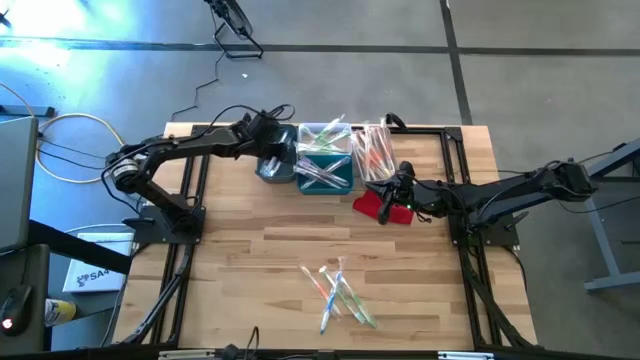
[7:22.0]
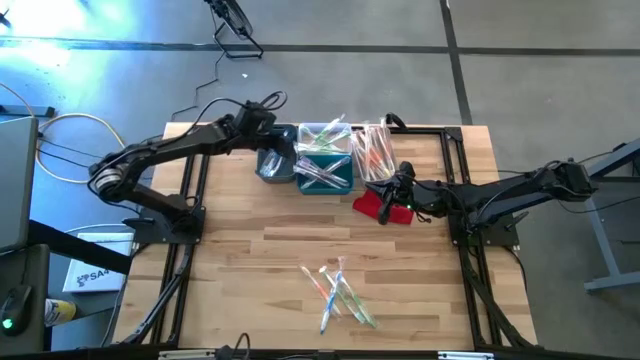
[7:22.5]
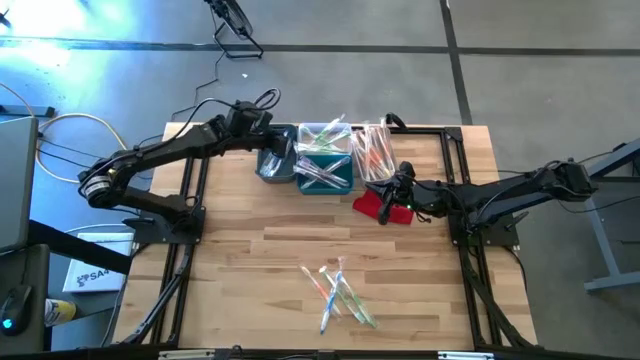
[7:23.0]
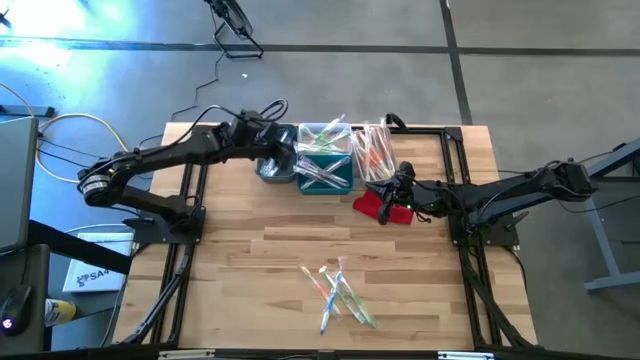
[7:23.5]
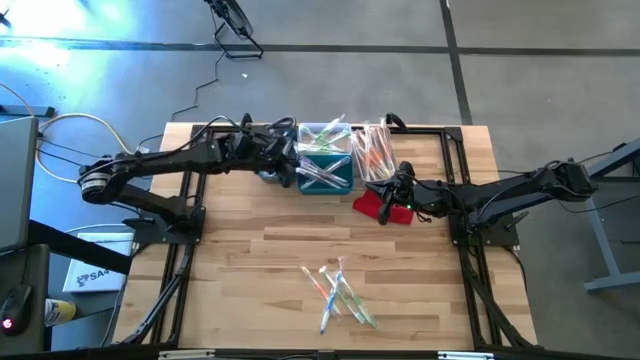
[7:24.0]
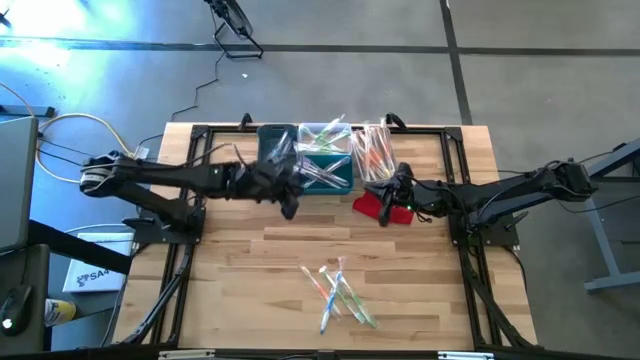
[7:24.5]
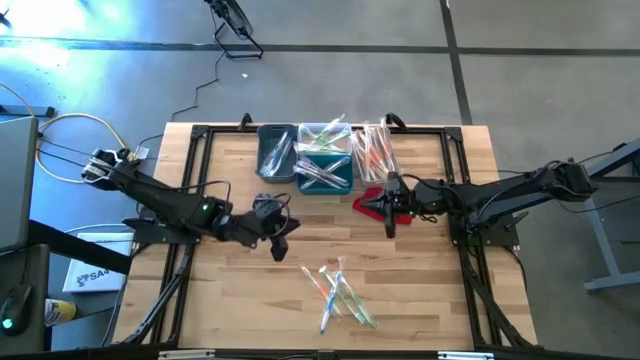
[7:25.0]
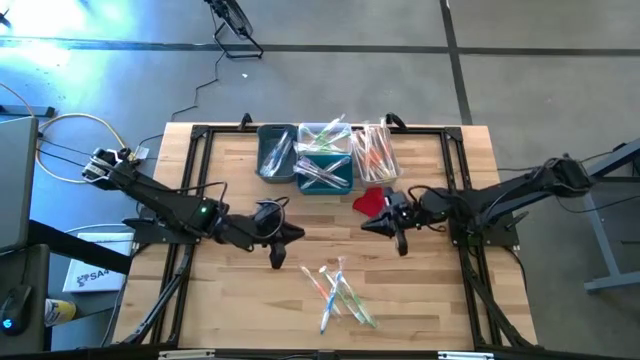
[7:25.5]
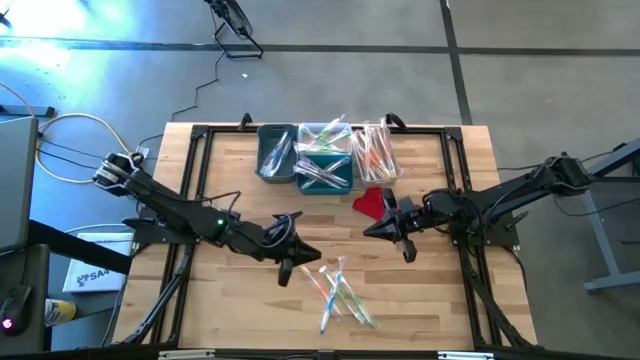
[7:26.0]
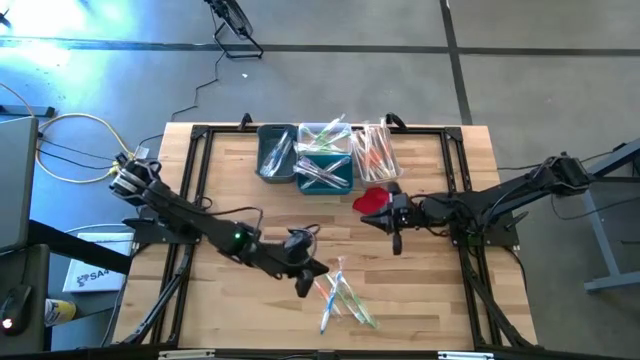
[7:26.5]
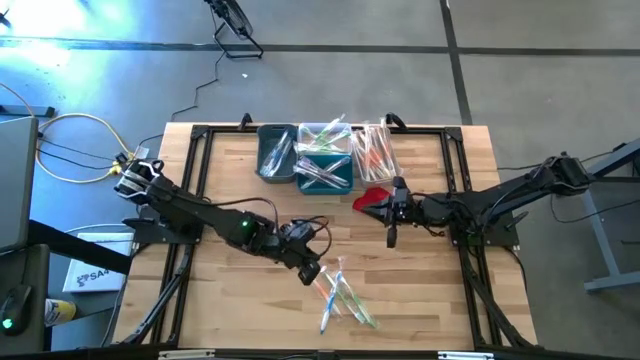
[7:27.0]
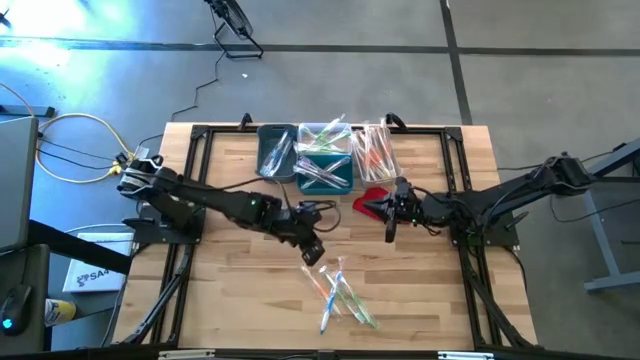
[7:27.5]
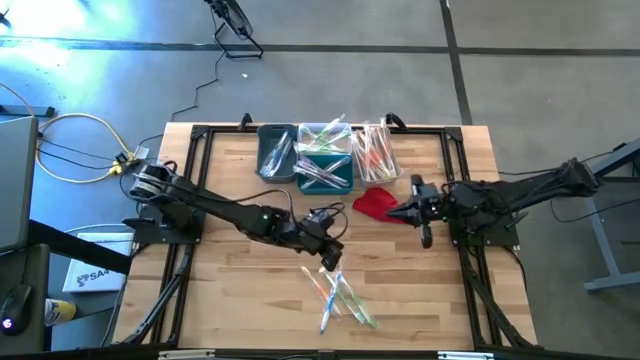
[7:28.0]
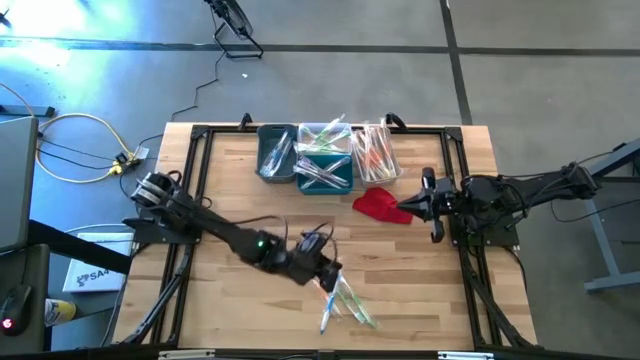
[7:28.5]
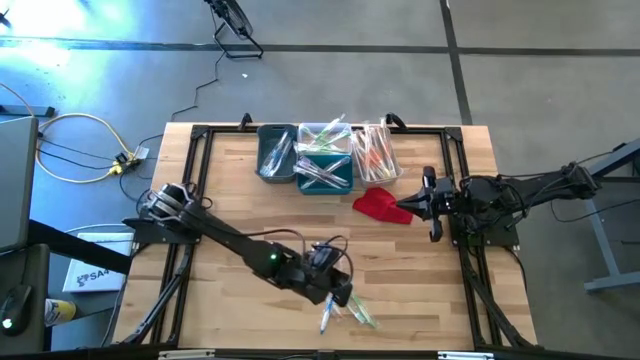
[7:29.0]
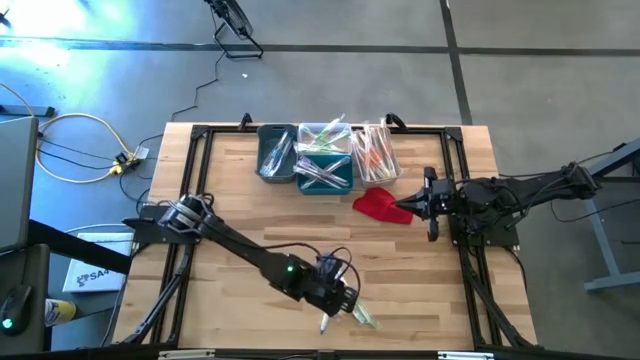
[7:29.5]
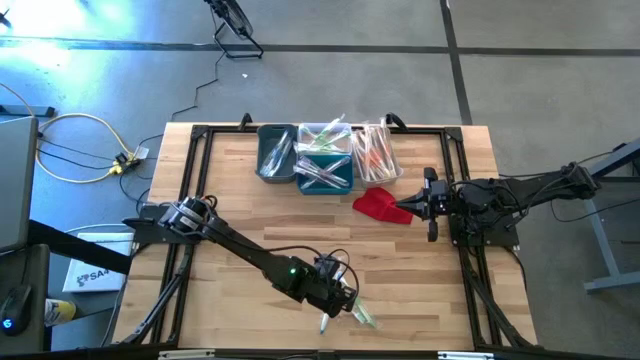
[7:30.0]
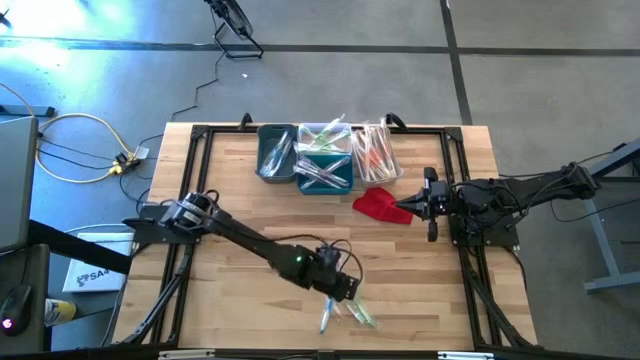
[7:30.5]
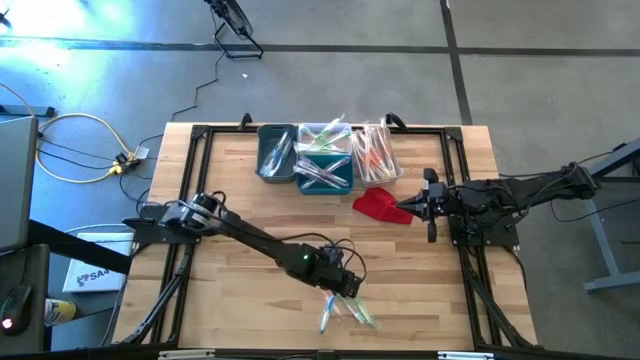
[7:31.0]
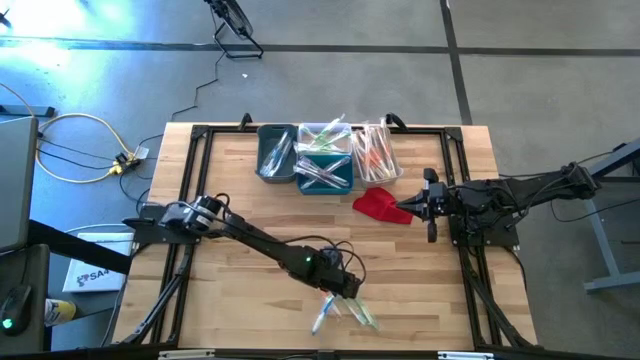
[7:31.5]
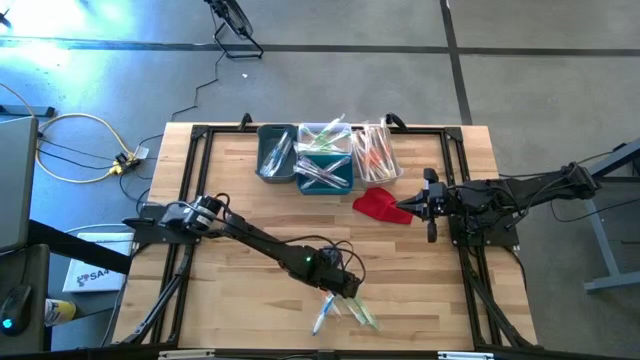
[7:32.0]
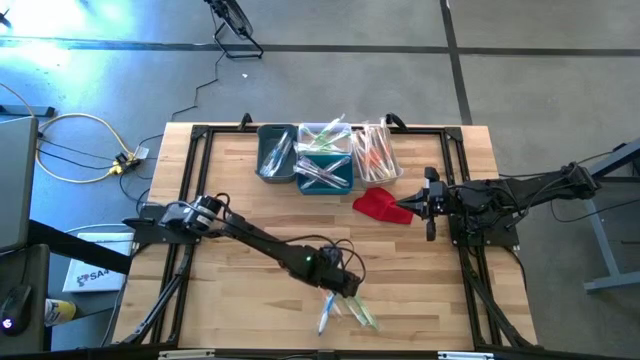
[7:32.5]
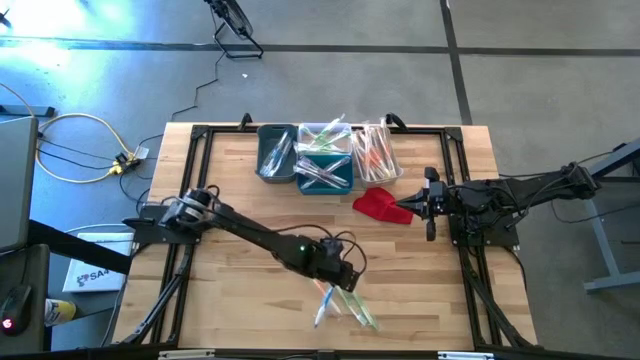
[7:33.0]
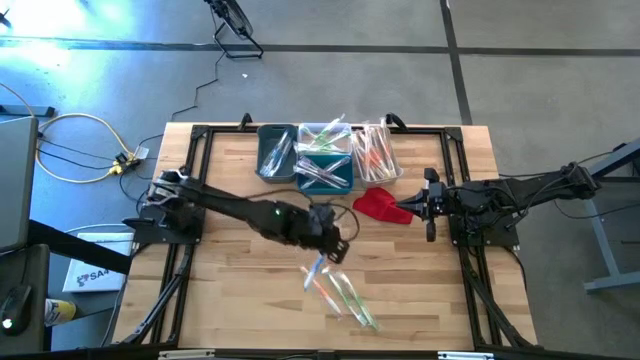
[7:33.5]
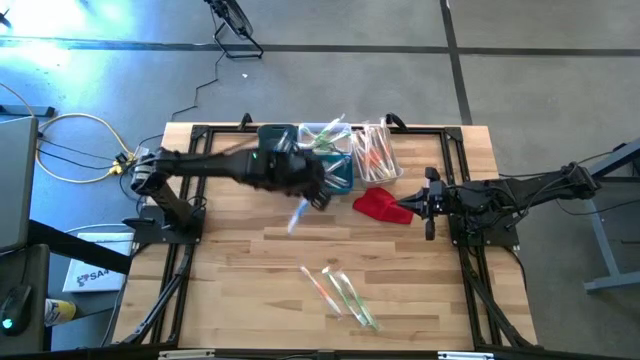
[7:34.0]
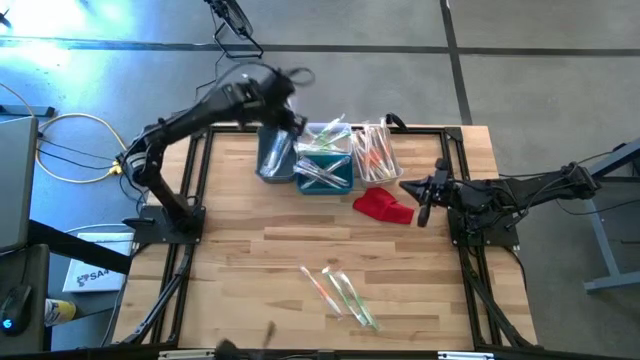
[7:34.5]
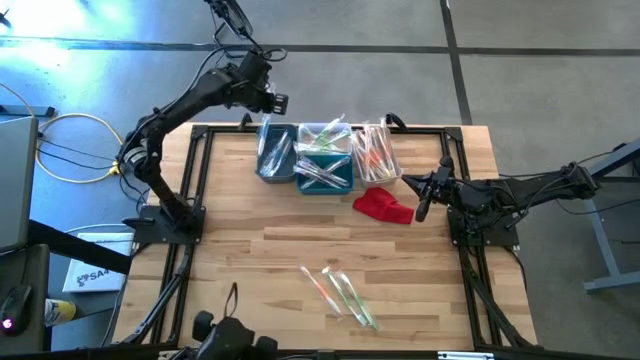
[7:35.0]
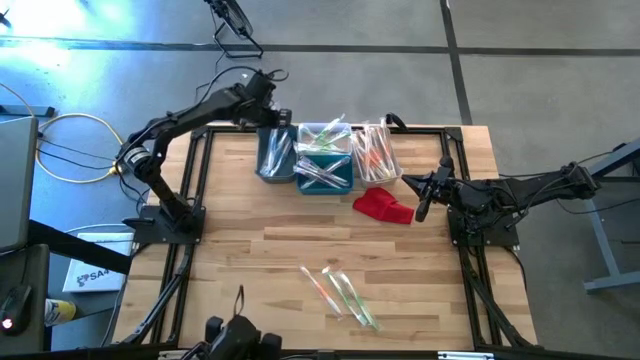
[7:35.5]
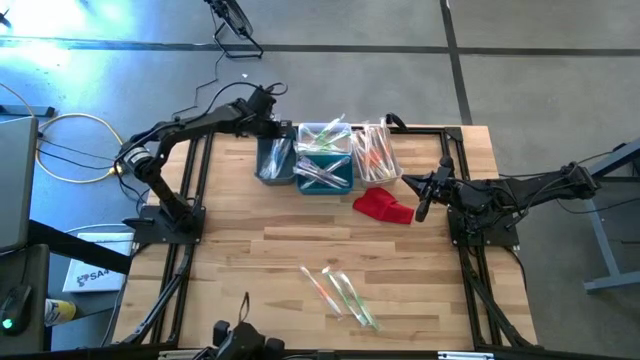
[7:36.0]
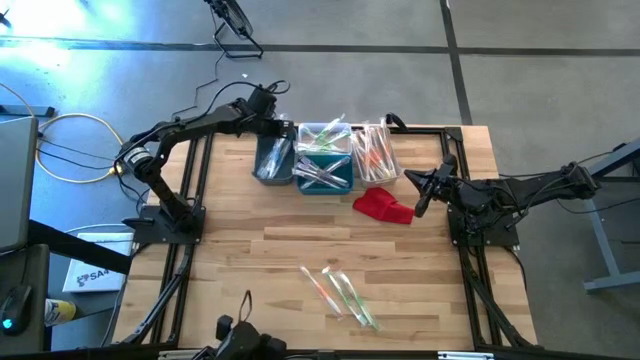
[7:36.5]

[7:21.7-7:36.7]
Task: Pick & Place Toothbrushes
Put the blue toothbrush into the gray bin

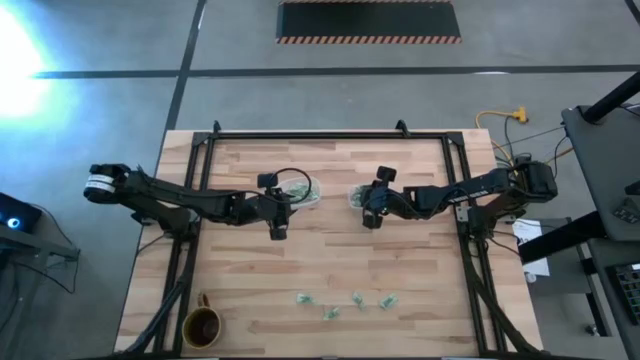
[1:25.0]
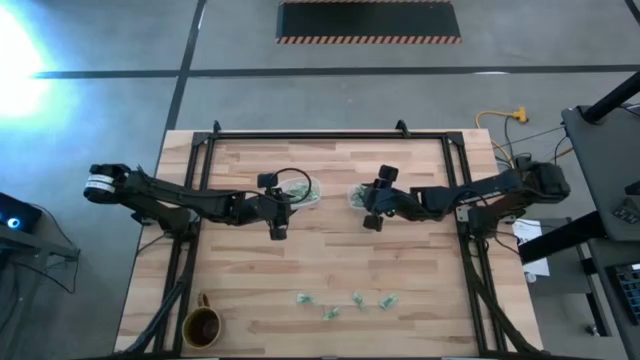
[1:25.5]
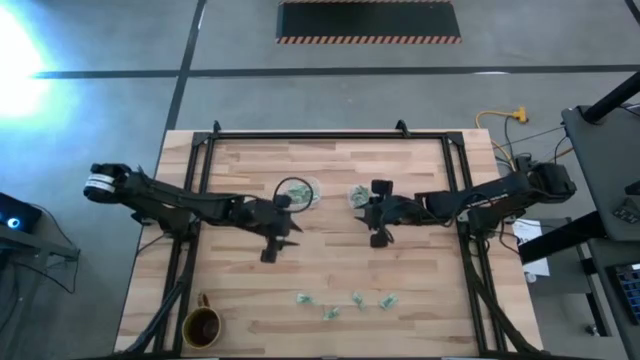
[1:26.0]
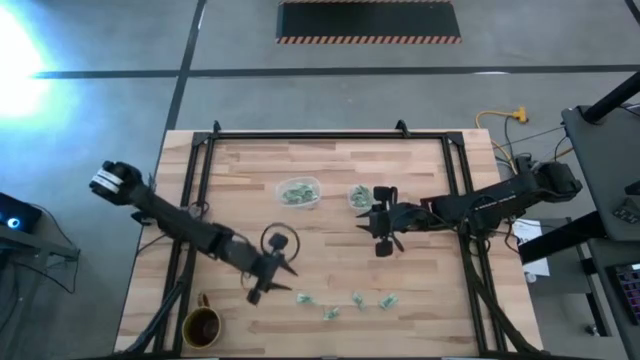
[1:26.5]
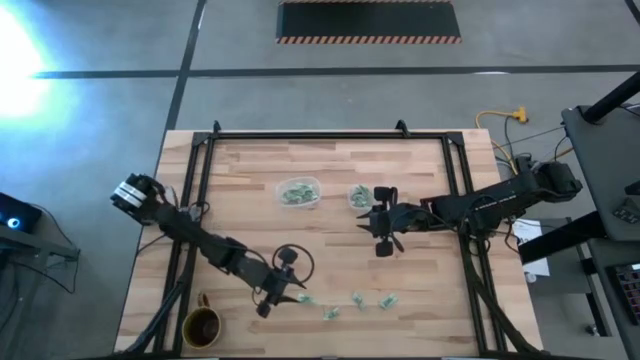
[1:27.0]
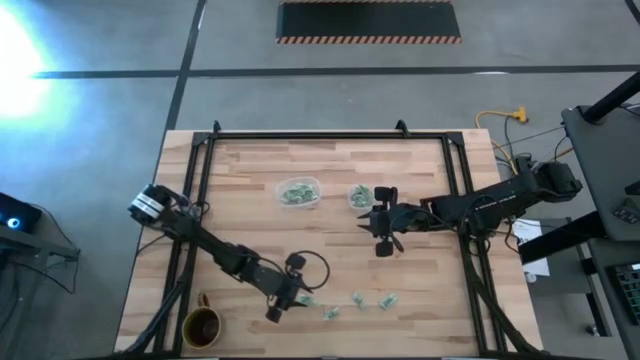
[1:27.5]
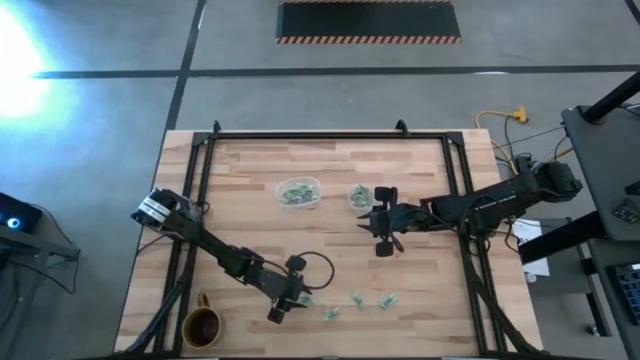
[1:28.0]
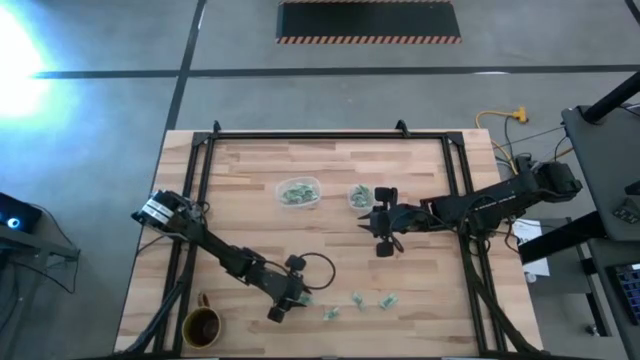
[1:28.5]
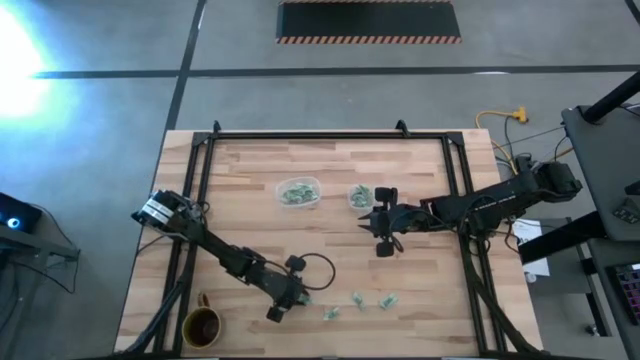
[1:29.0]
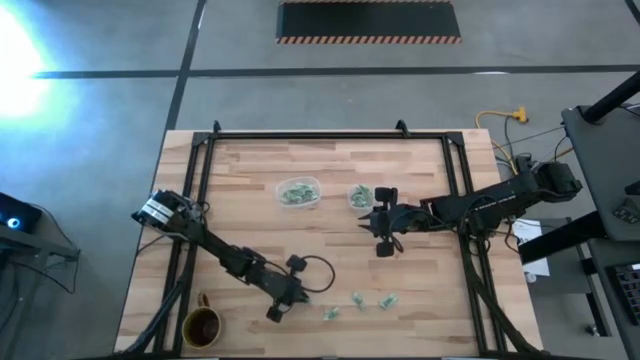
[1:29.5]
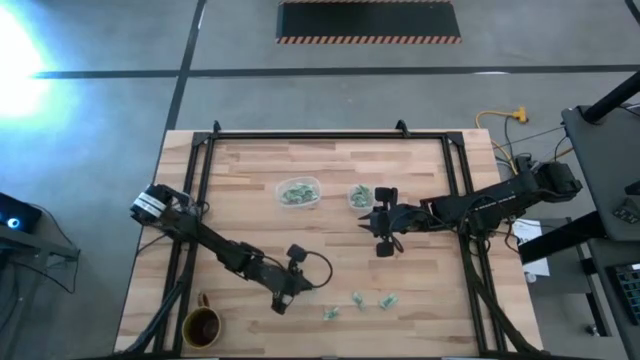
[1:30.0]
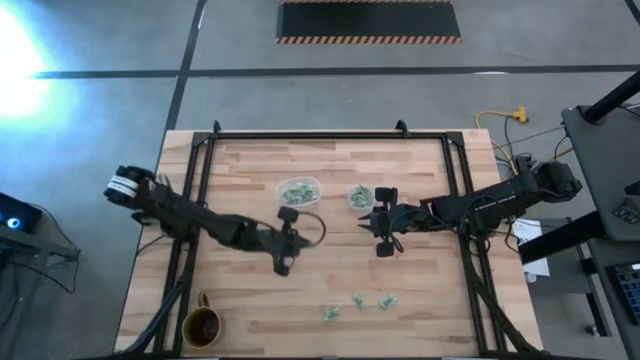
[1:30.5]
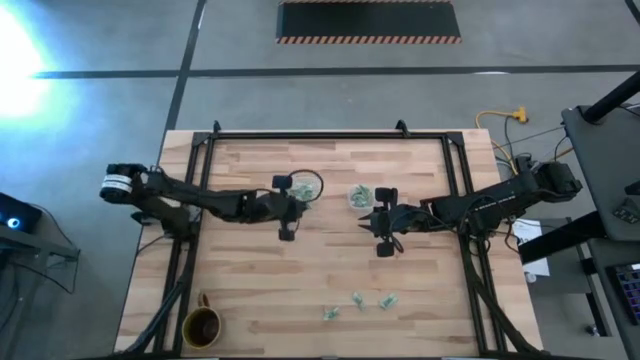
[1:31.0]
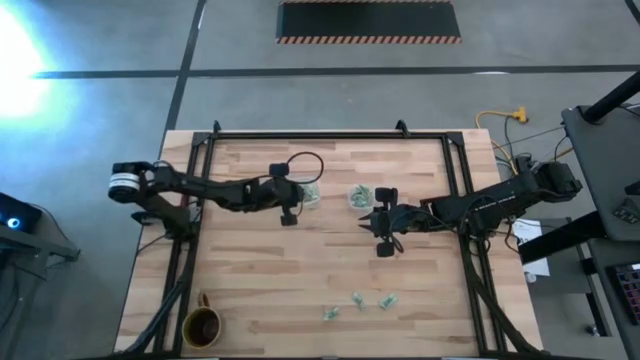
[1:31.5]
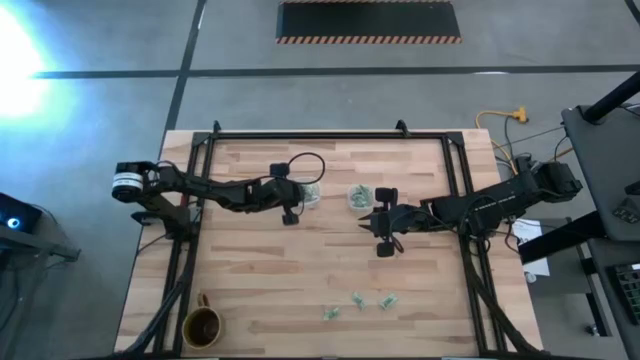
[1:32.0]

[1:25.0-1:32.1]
Task: Pick and place Stevia / Truvia into bins
Put the stevia packet into the transparent oval container
